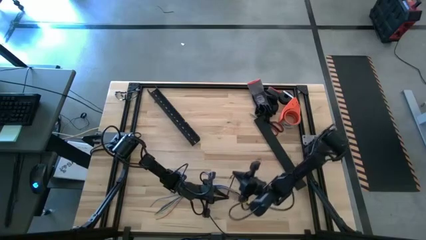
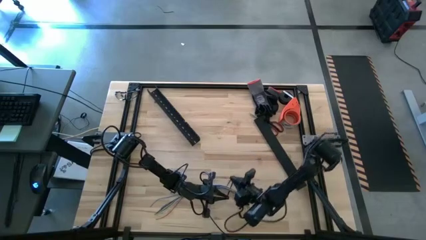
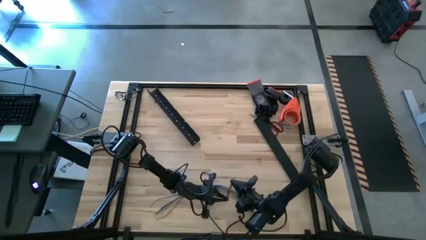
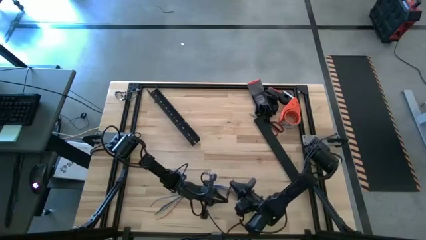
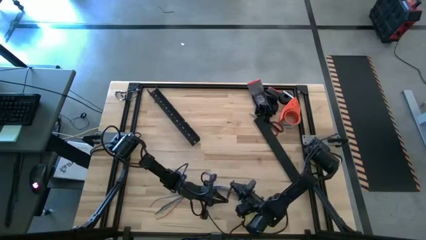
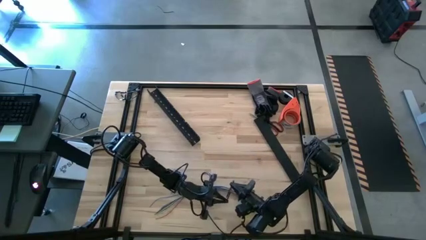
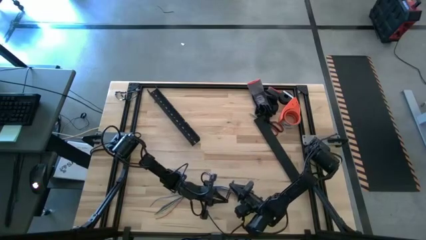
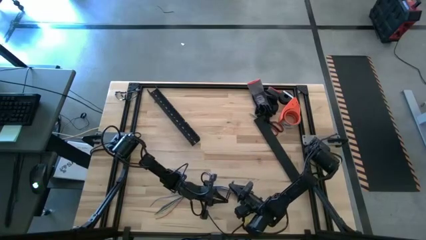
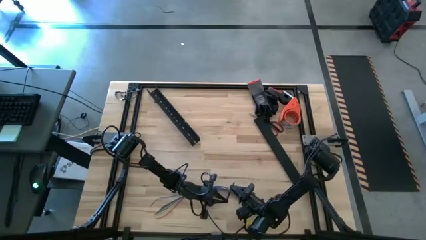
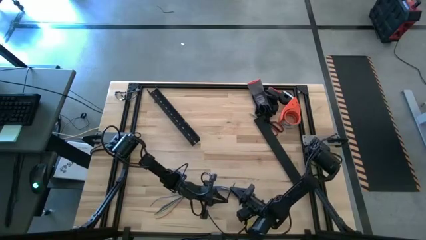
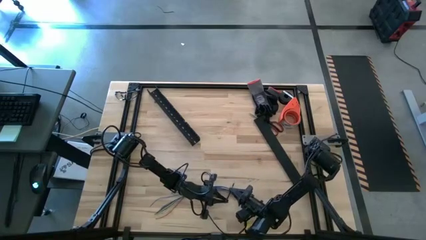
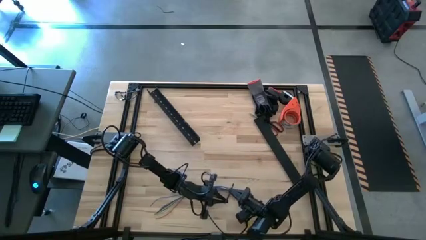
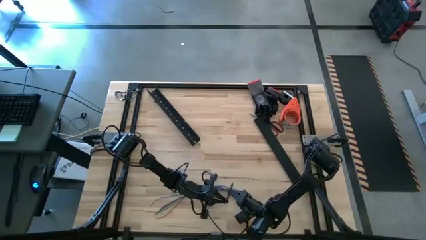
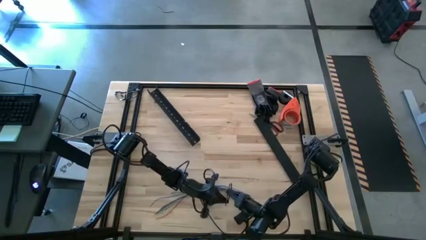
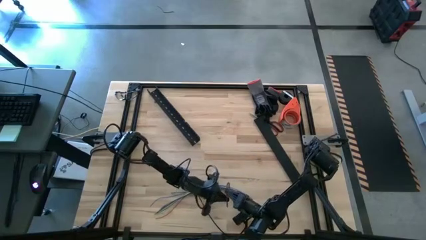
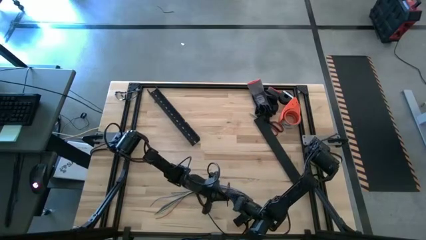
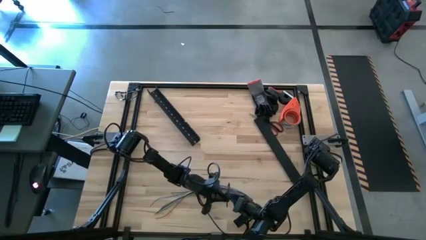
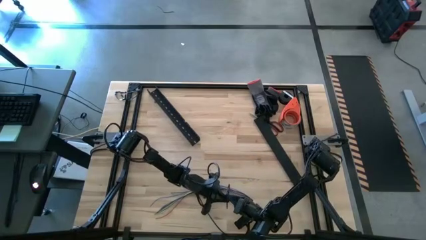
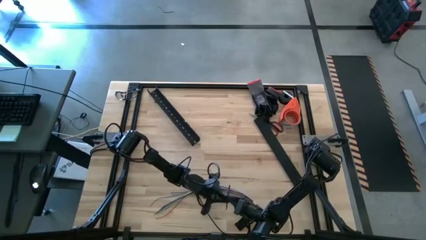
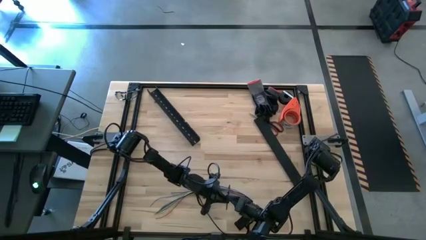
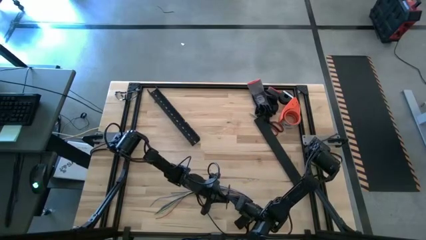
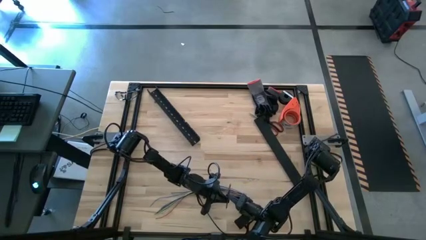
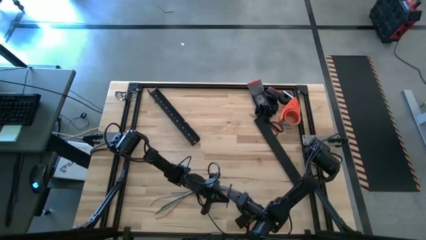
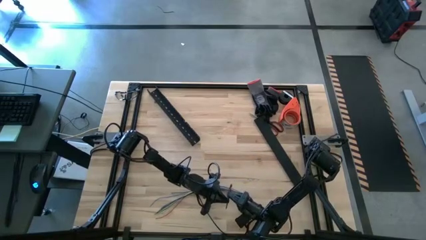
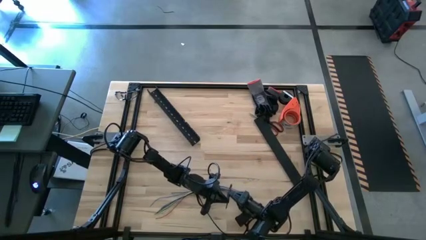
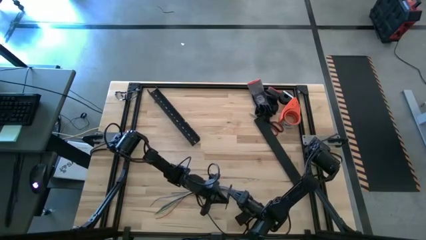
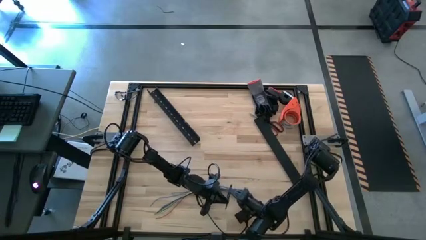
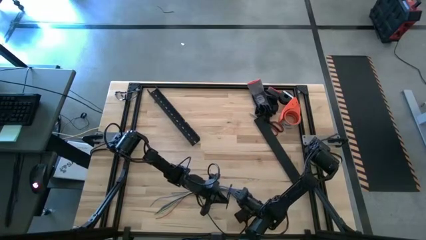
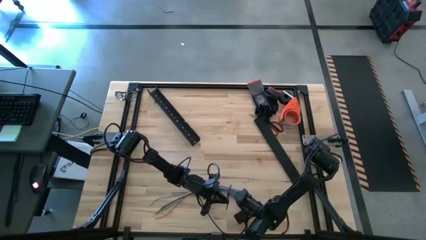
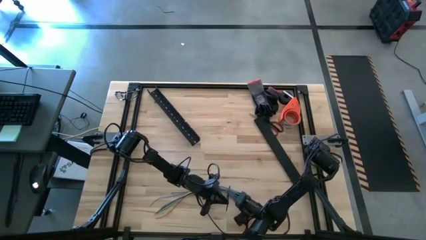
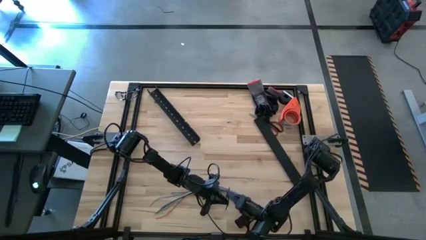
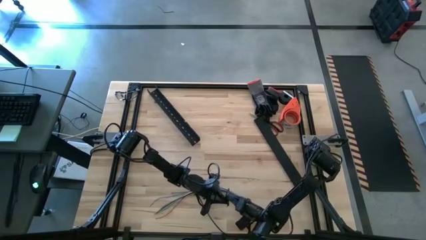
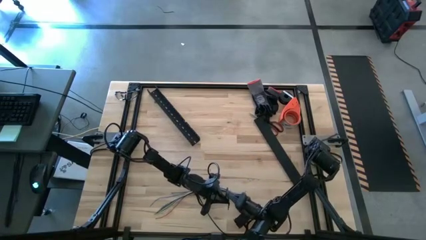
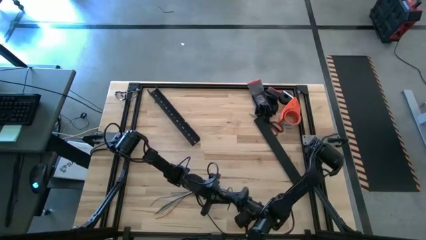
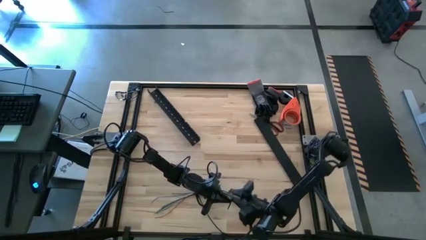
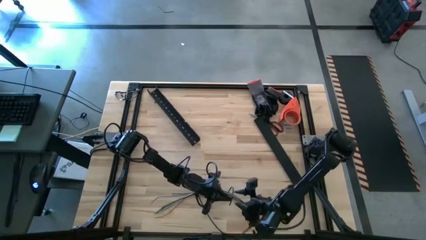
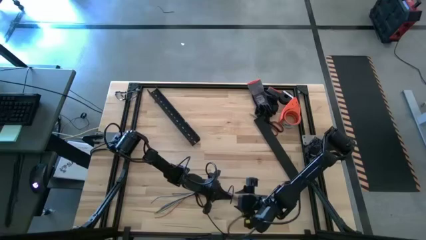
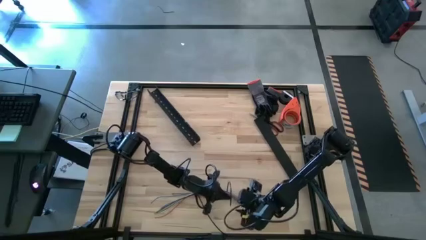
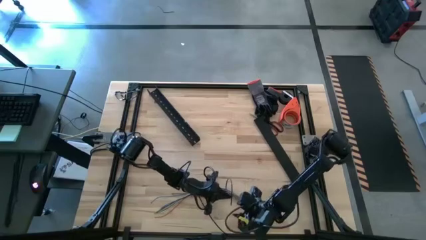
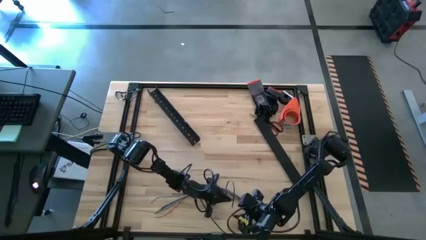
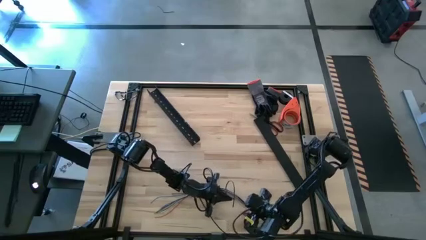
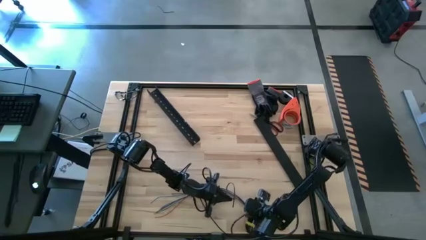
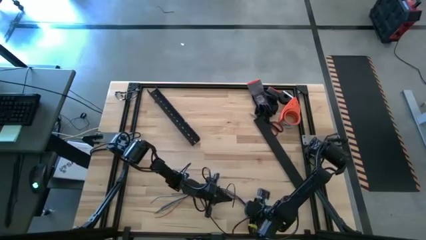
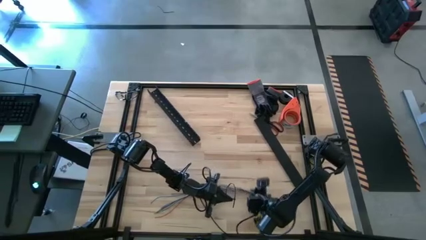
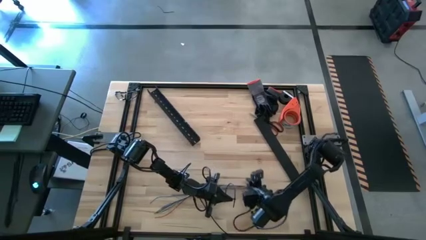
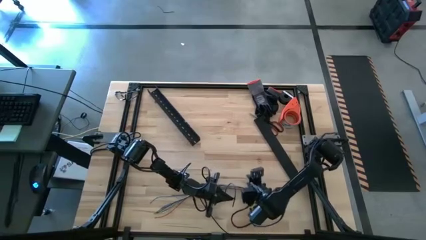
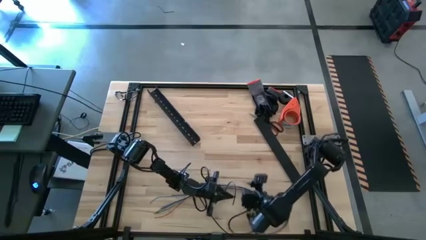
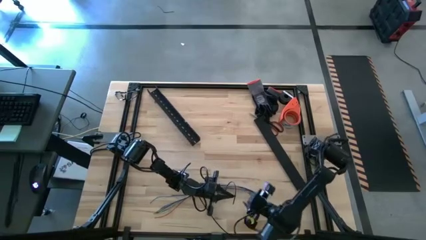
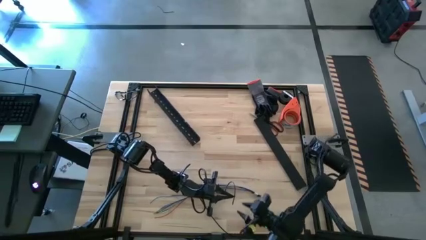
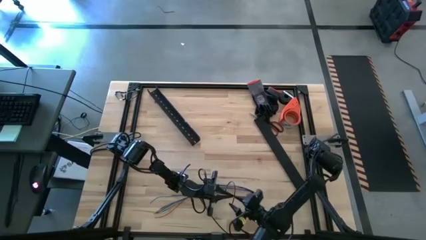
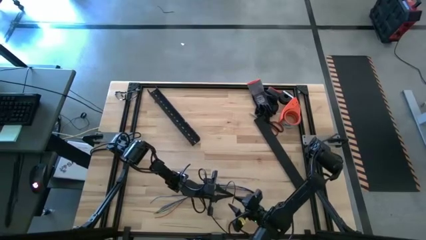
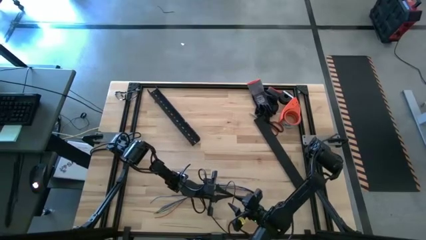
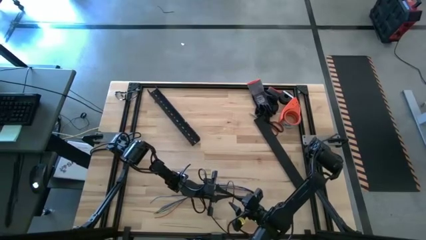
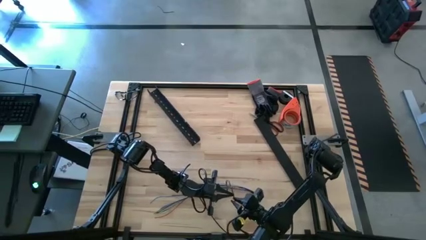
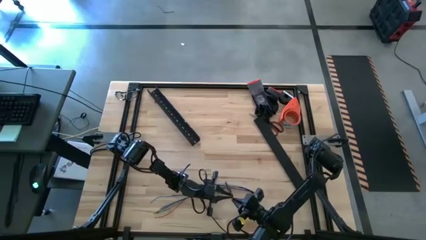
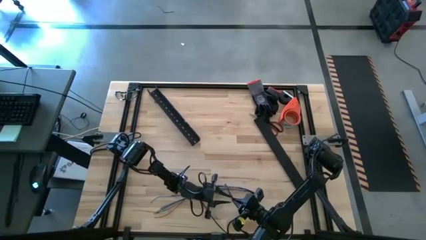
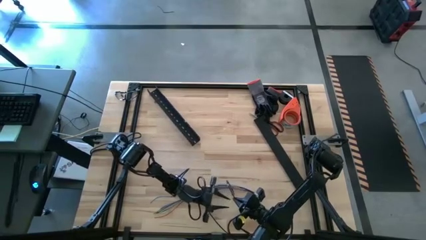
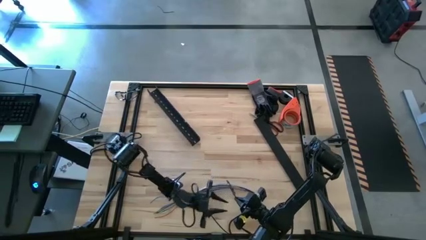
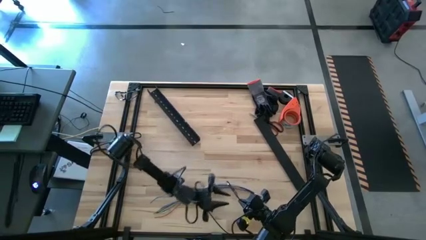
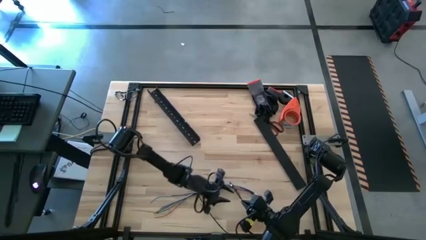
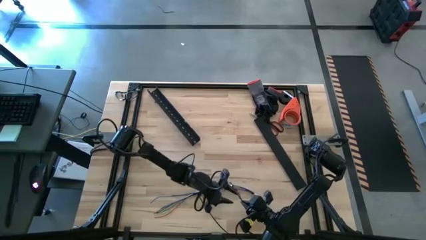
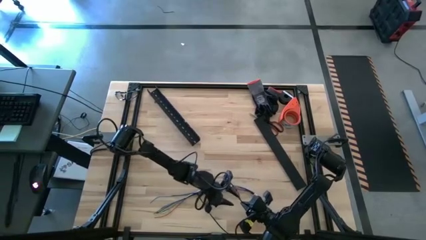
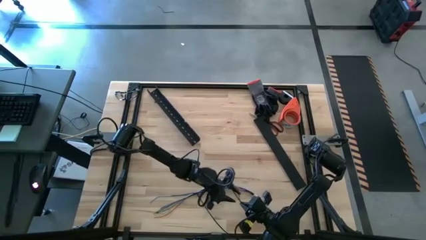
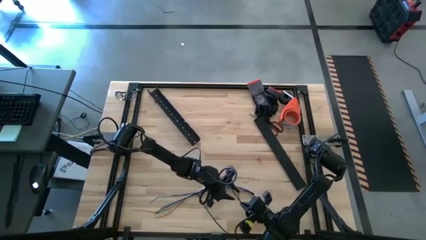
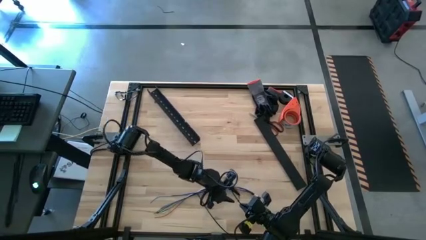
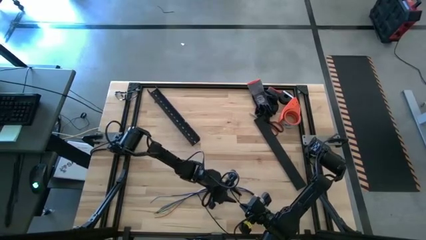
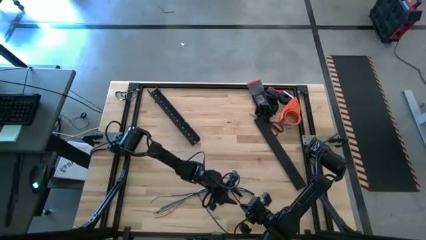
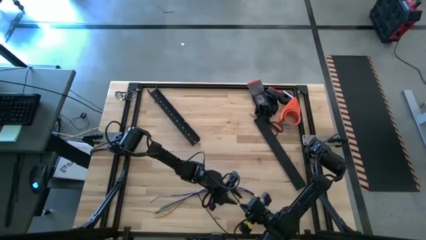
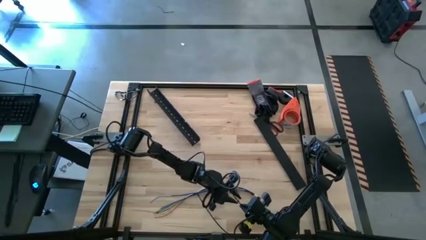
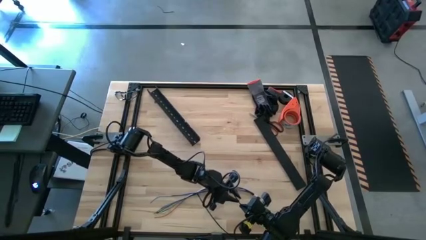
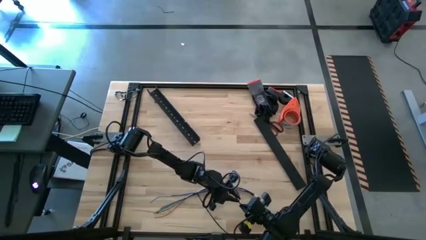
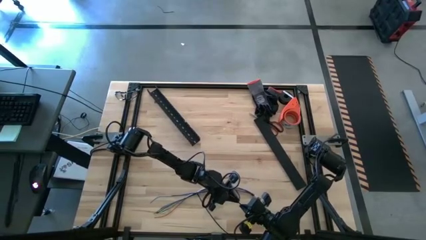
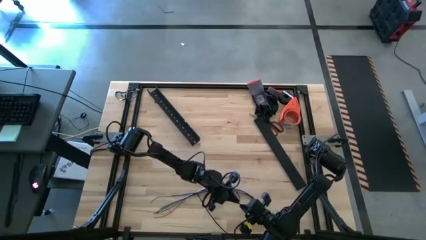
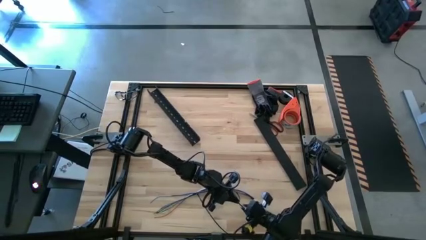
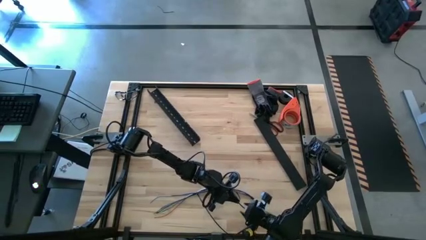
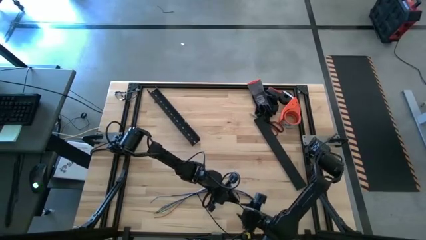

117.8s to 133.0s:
Task: Ziptie cables
Wrap the cable wires with the black zip tie
